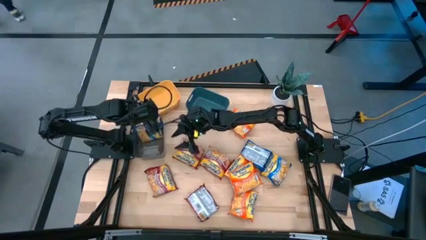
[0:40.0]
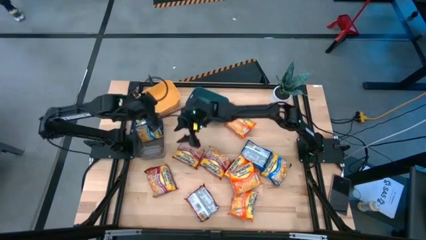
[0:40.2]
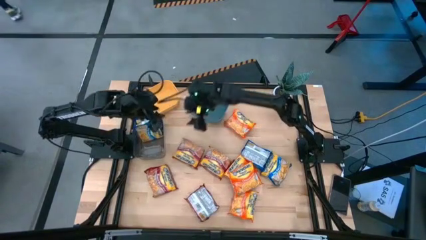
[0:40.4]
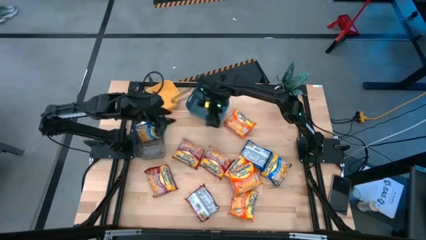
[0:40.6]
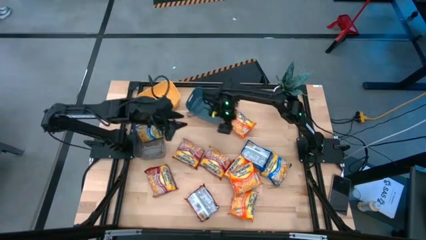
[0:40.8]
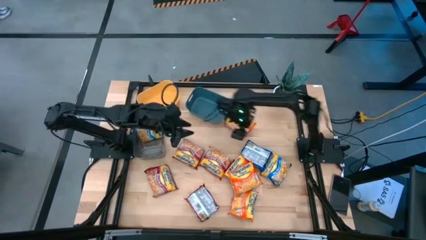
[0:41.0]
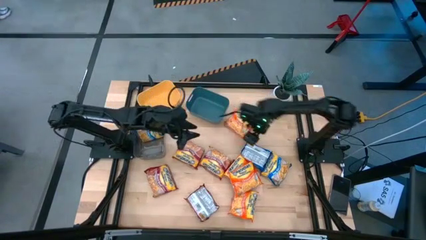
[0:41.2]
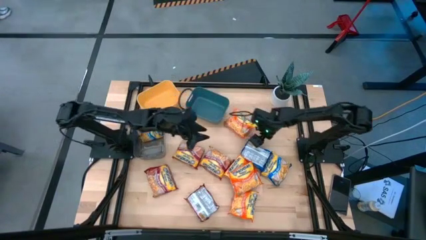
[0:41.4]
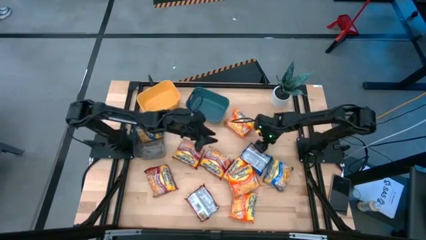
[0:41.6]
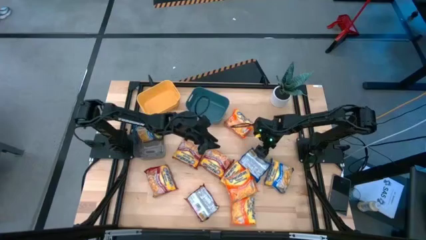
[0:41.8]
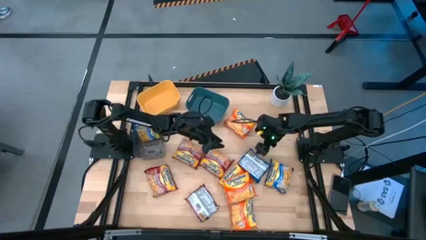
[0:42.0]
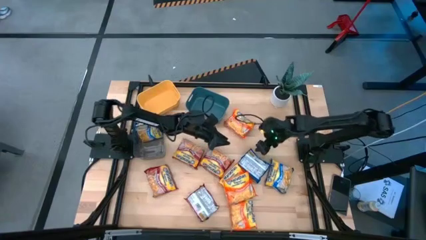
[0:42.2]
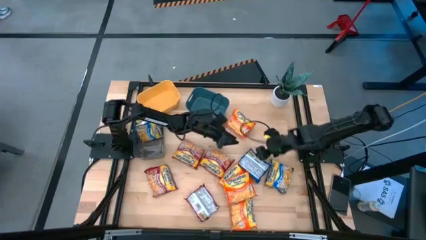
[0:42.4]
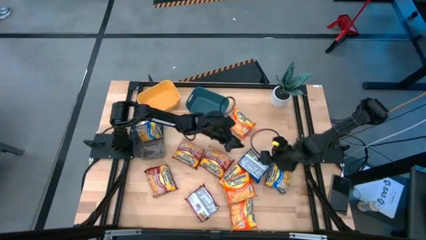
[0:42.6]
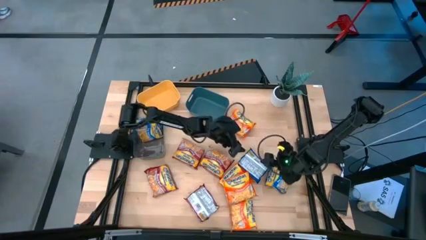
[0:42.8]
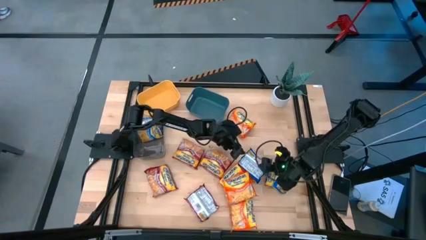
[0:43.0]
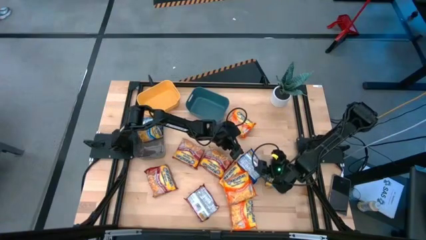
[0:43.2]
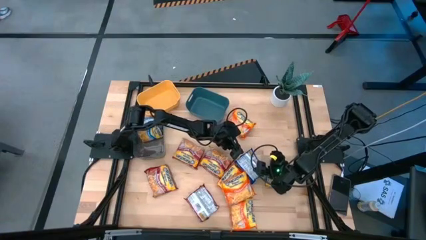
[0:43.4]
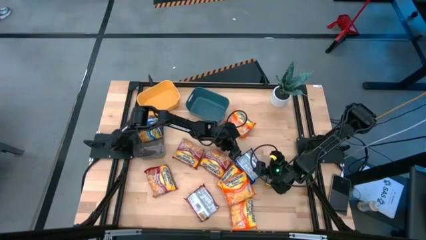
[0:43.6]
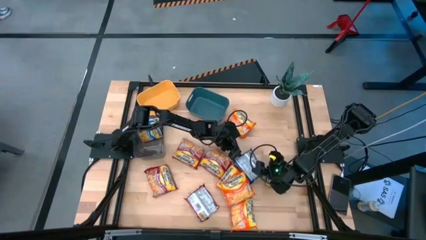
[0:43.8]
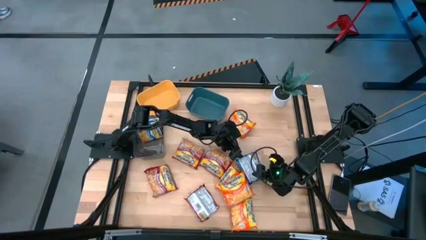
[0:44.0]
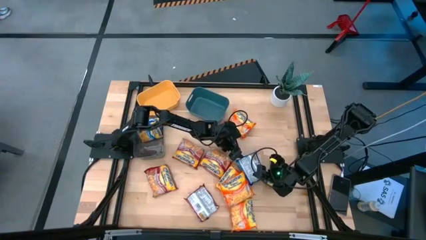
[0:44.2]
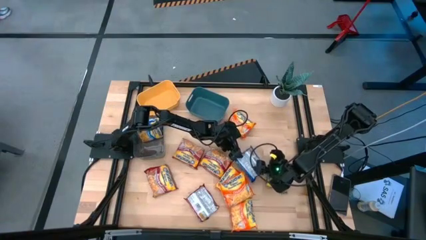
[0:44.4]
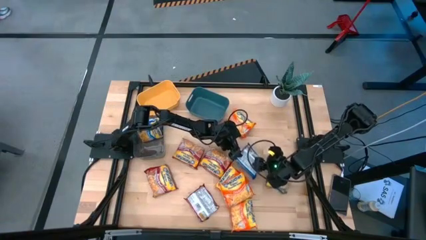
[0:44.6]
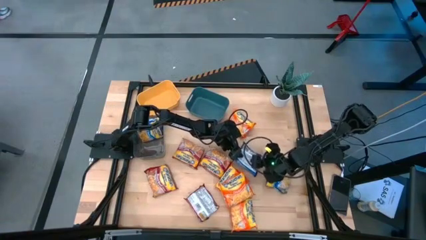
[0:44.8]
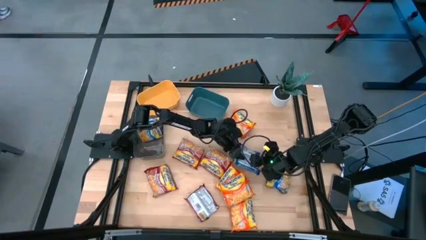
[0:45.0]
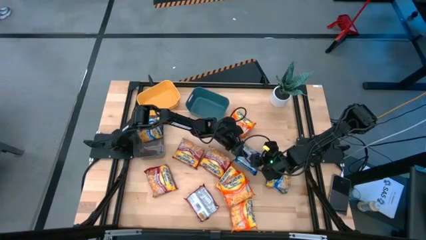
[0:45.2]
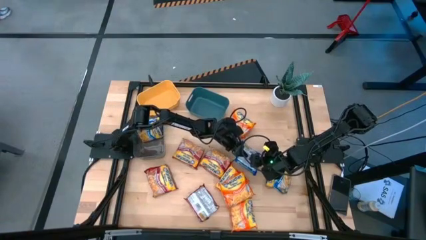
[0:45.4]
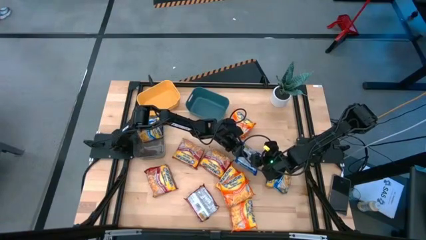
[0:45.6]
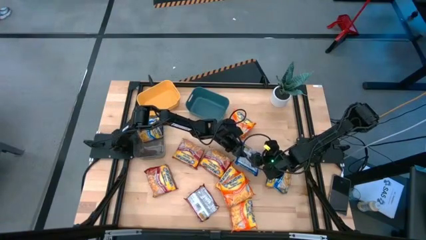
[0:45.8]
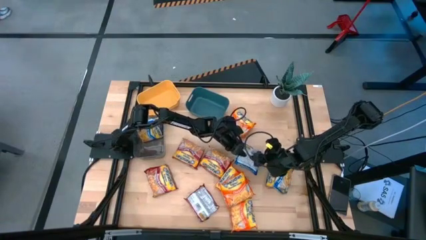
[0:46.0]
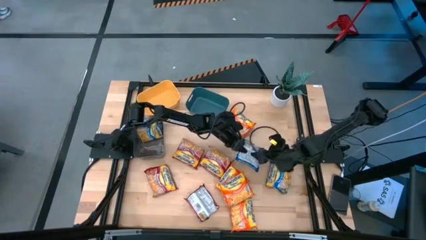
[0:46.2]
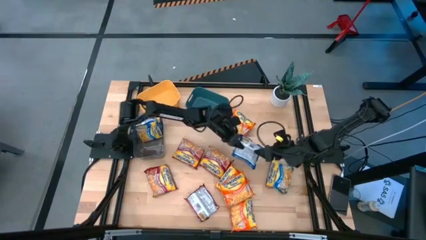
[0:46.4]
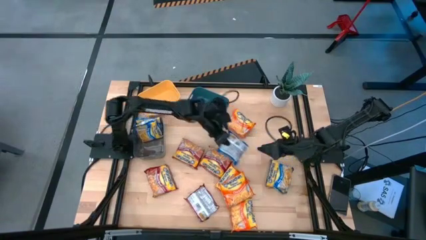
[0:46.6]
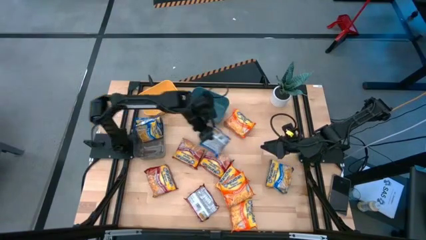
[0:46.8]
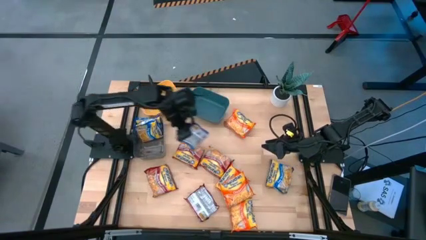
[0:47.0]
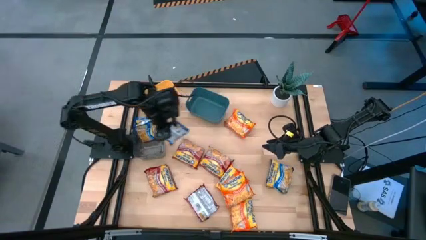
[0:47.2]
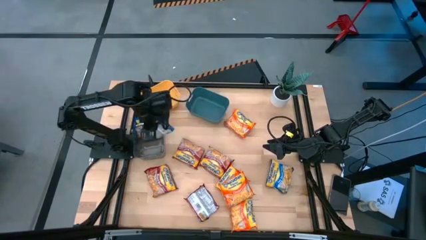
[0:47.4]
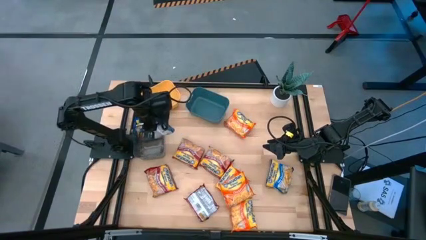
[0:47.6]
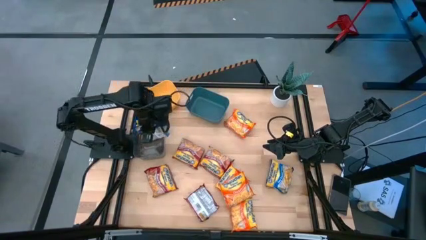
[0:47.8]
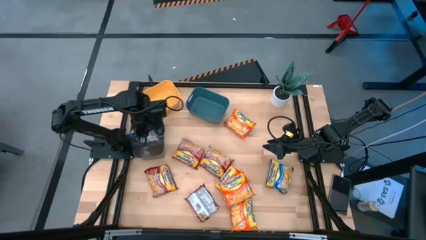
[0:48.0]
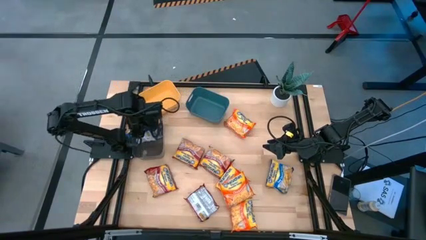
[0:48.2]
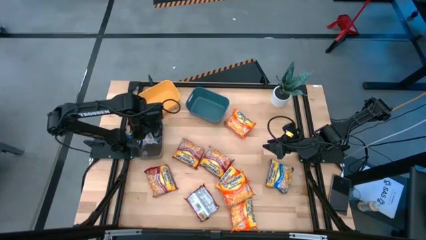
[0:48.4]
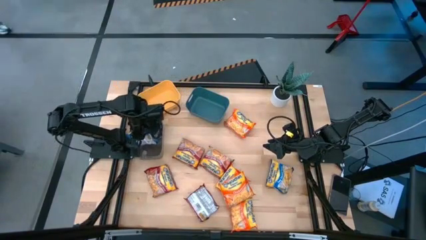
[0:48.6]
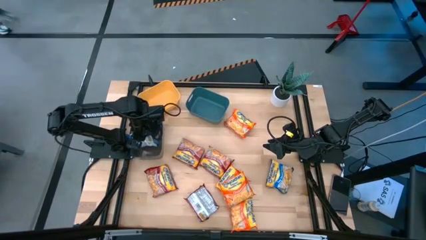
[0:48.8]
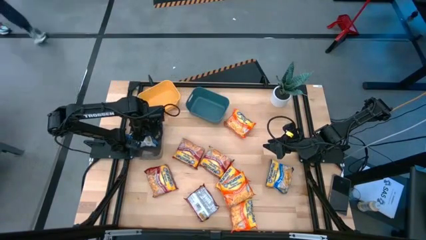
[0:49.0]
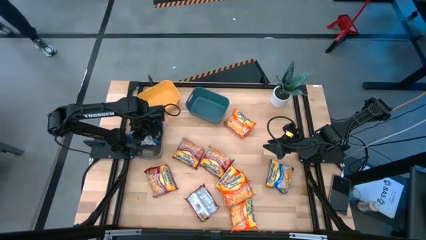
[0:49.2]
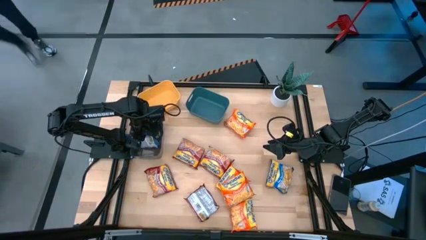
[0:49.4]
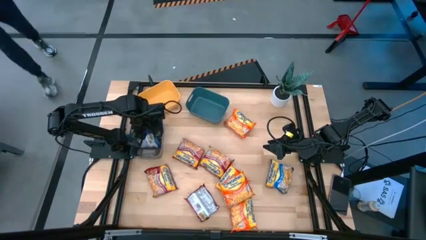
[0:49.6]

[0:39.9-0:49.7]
Task: Sort Maruchan noodles
Put the blue noodle pack into the black bin

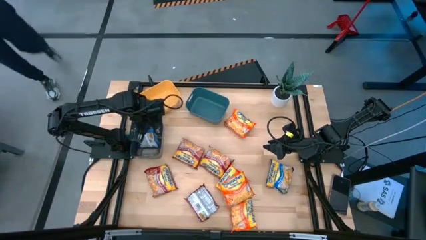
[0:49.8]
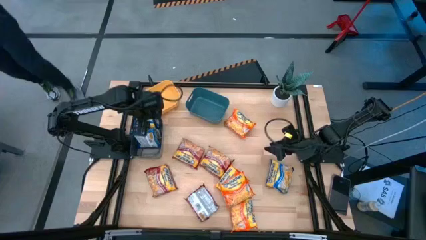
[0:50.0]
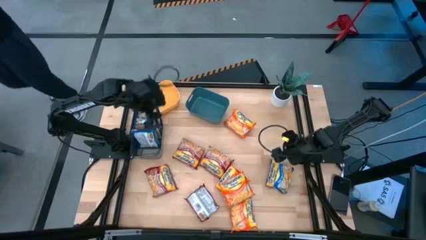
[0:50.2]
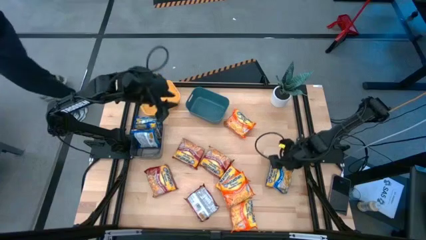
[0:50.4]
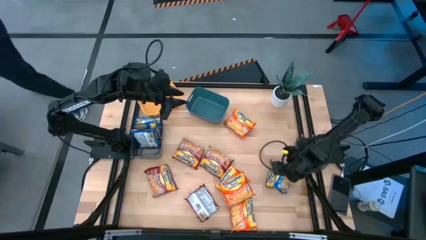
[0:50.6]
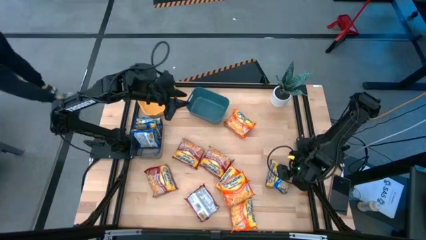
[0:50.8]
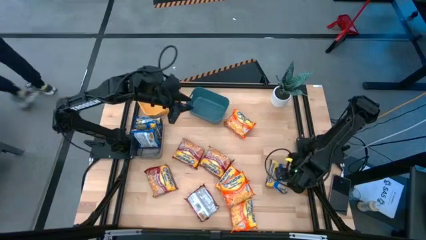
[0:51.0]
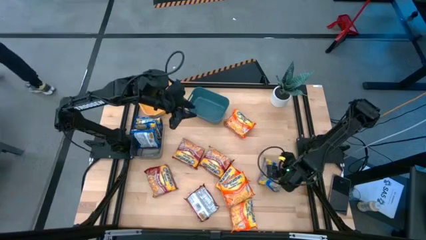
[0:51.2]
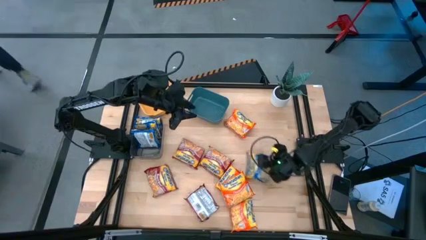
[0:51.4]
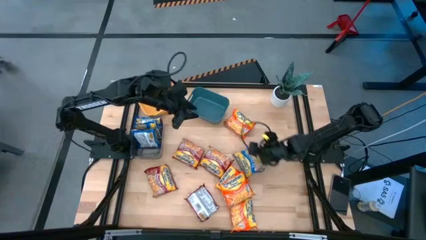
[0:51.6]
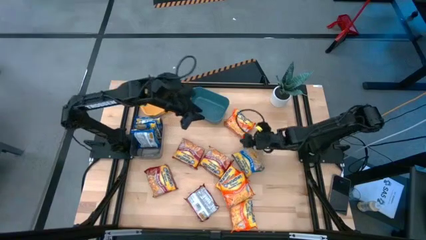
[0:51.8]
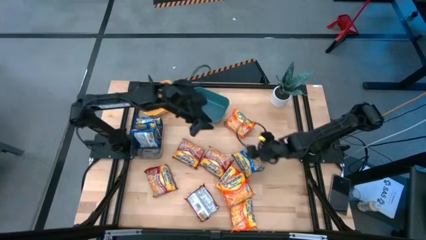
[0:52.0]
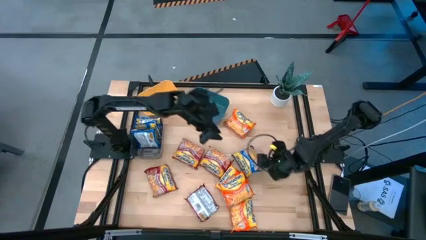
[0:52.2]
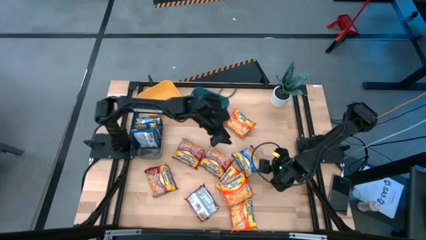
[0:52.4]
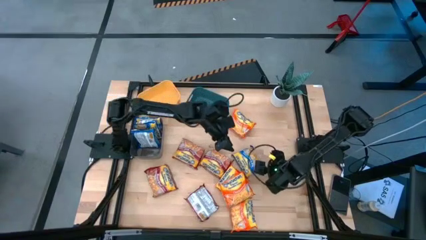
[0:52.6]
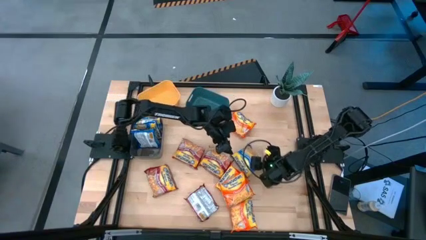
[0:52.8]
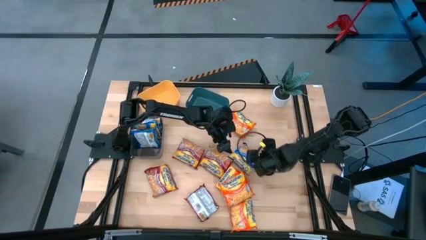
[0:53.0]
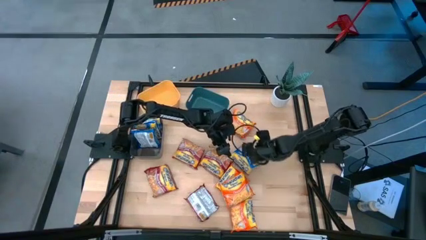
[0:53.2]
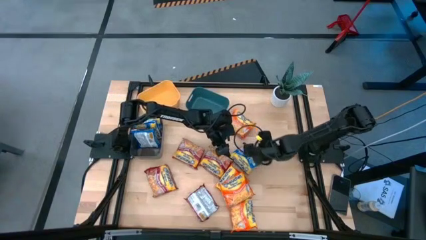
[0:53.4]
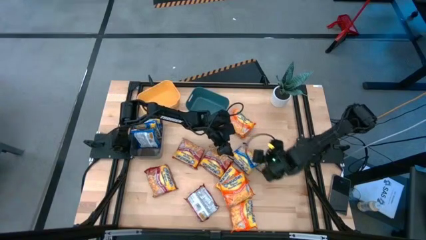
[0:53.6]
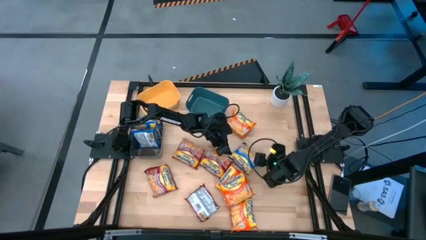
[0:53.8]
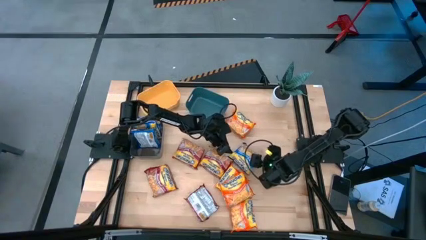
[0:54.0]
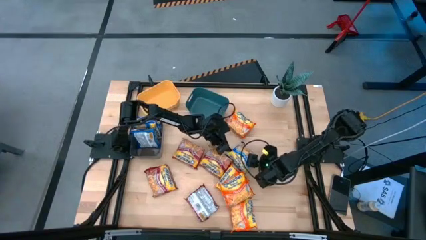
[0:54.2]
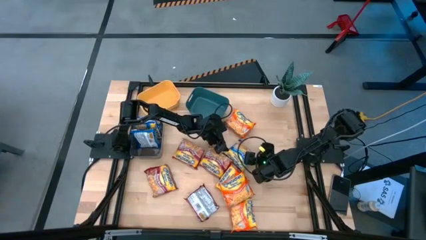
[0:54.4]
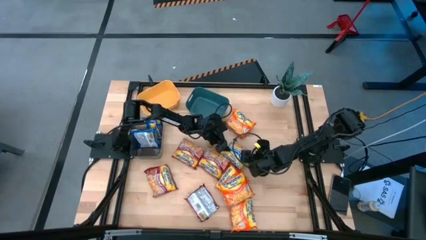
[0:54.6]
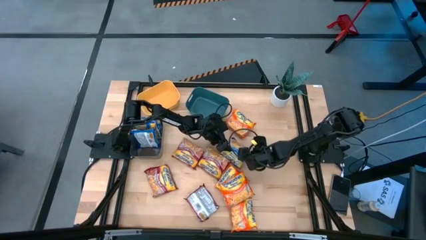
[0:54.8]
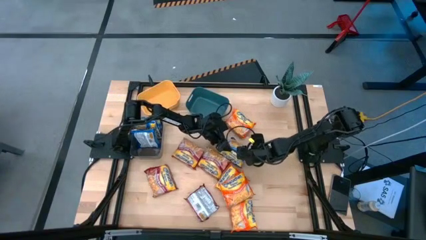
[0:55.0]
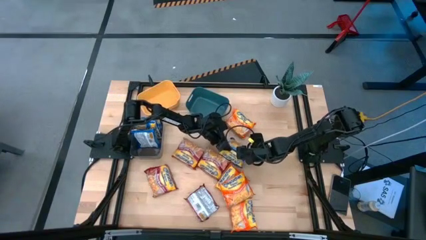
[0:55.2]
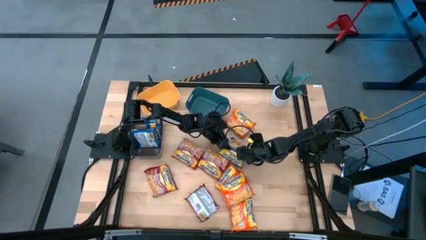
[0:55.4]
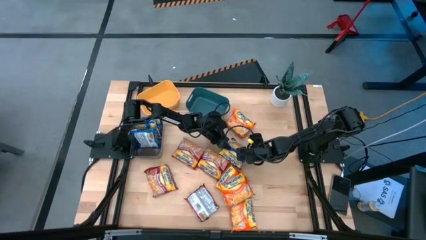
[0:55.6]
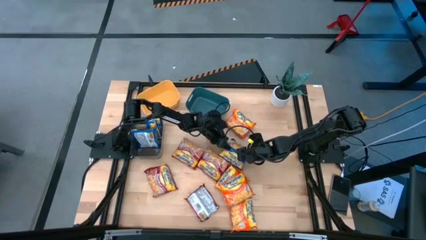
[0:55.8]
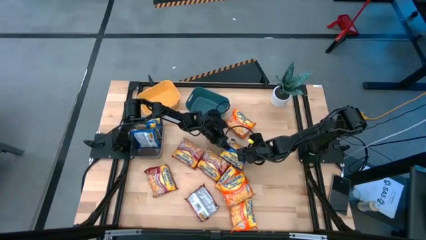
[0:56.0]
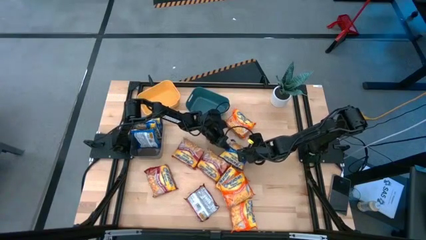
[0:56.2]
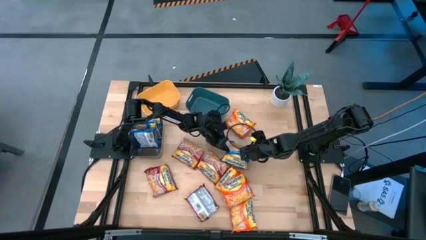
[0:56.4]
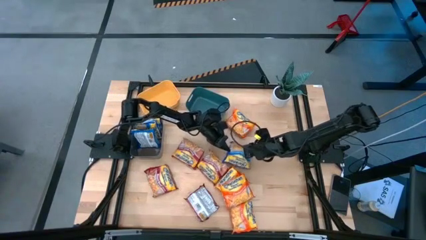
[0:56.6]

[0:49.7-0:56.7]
Put the blue noodle pack into the black bin
